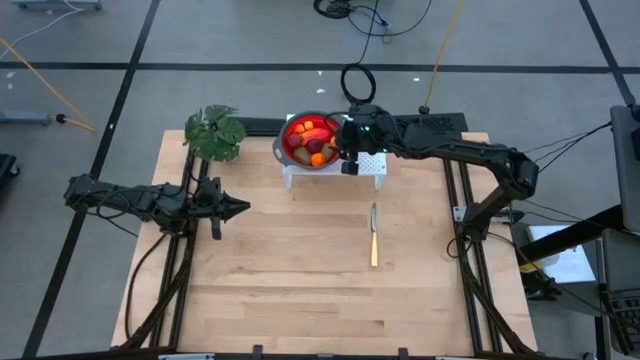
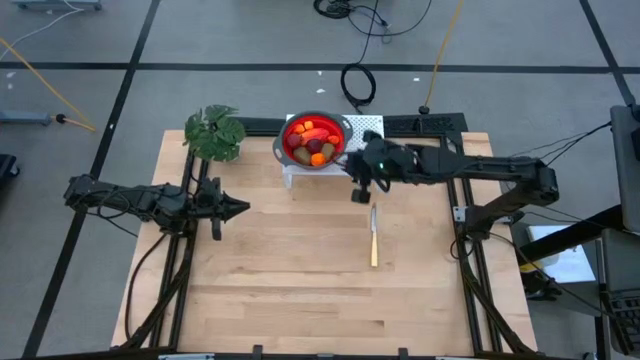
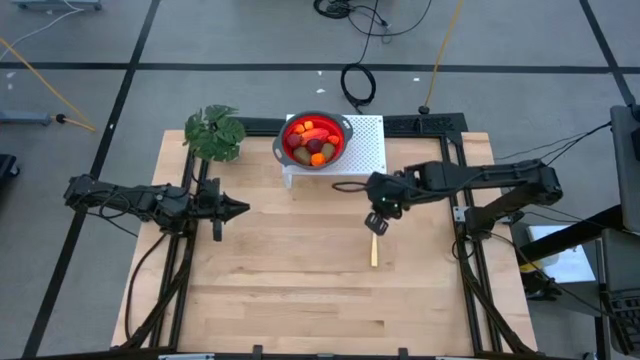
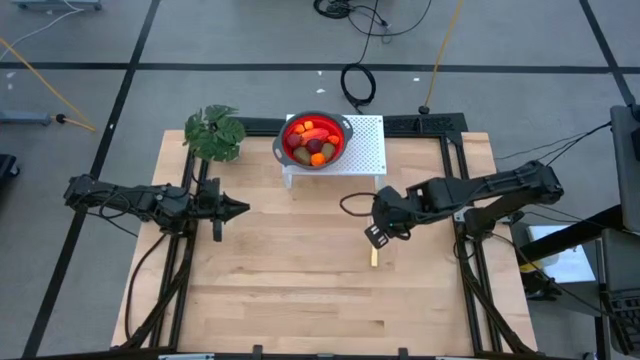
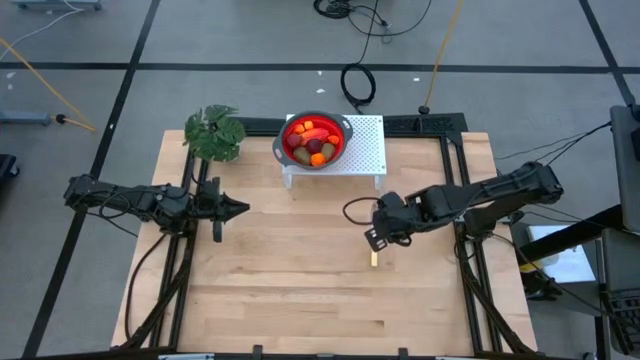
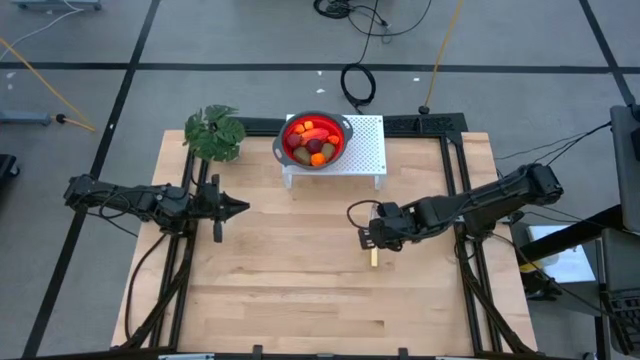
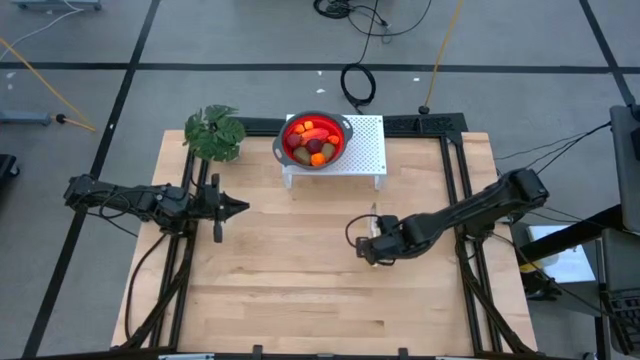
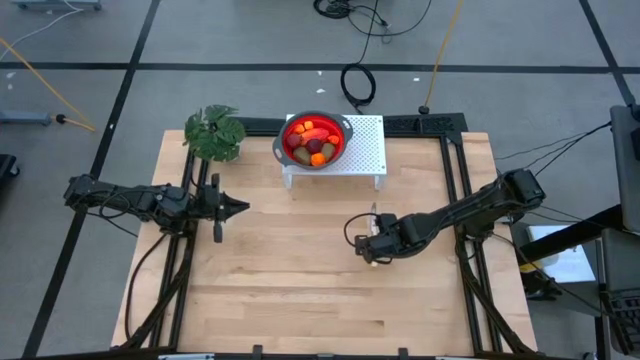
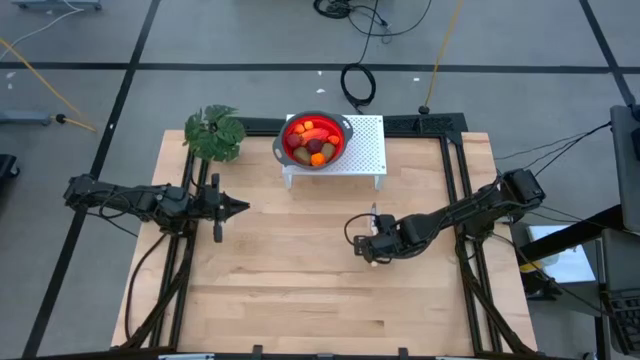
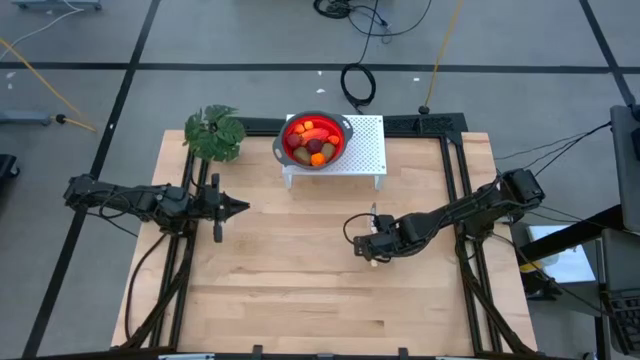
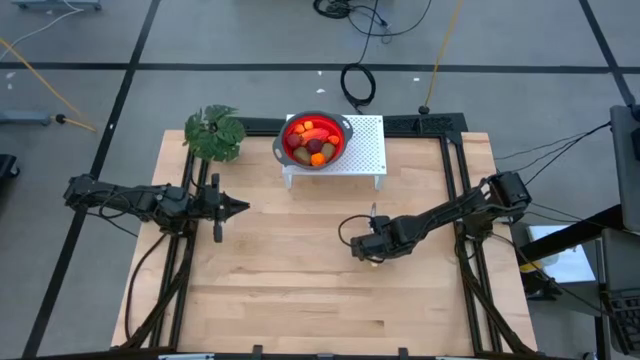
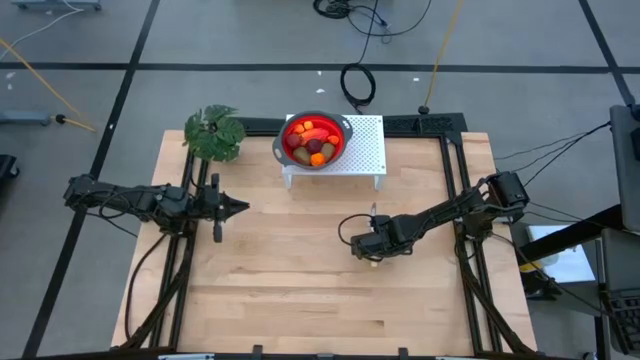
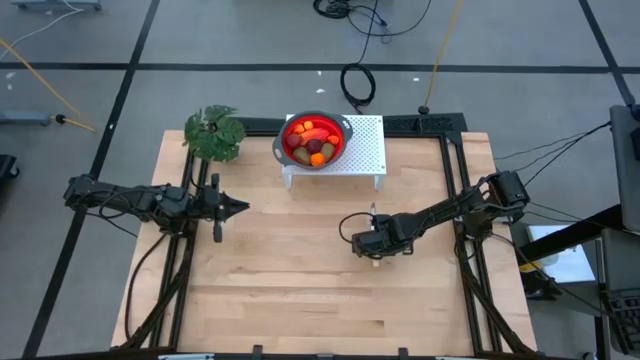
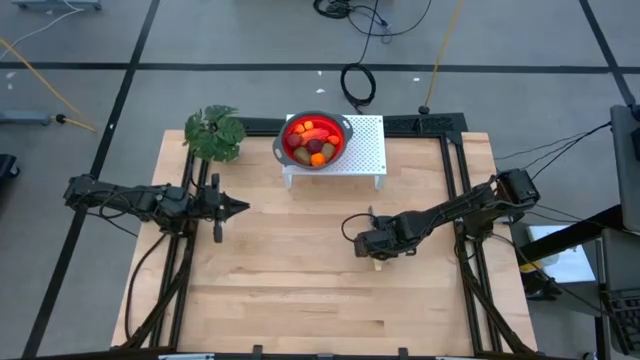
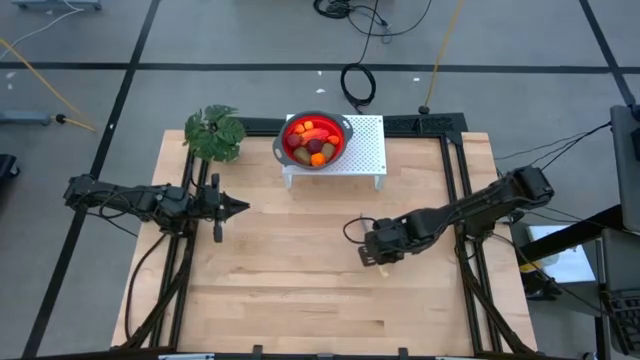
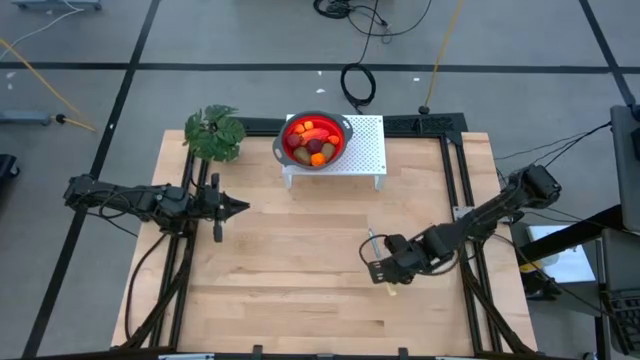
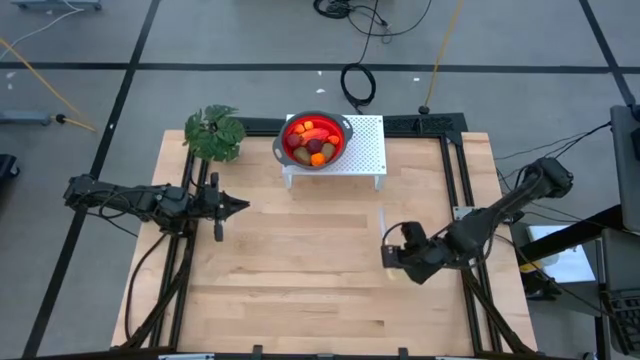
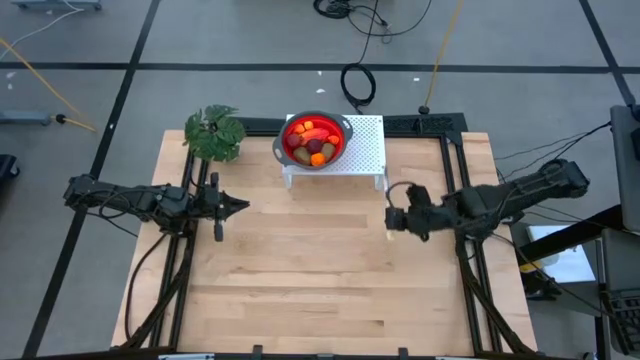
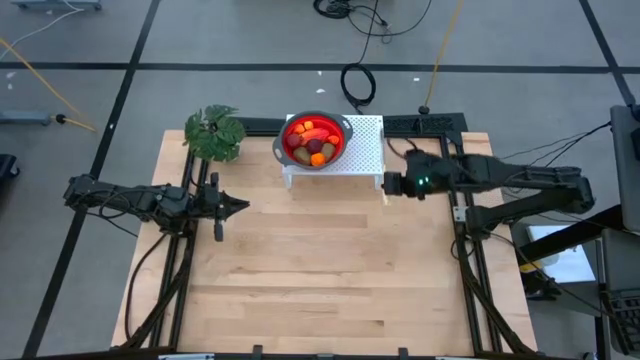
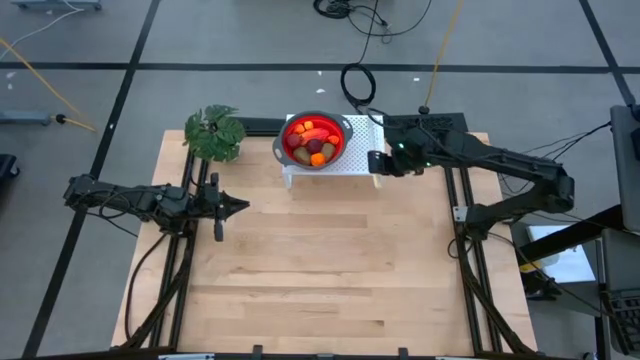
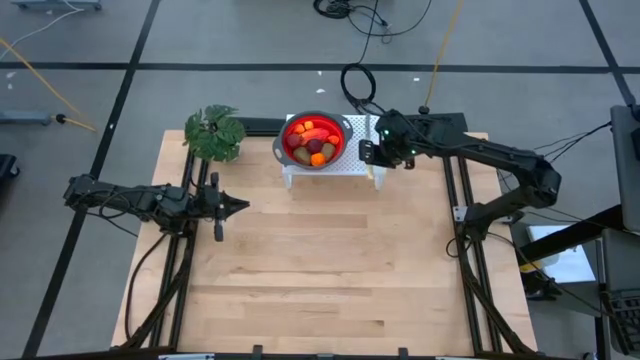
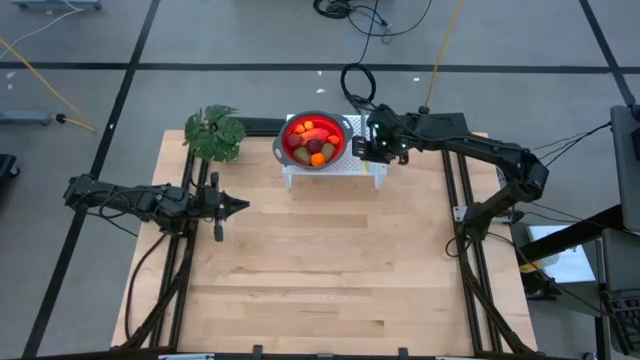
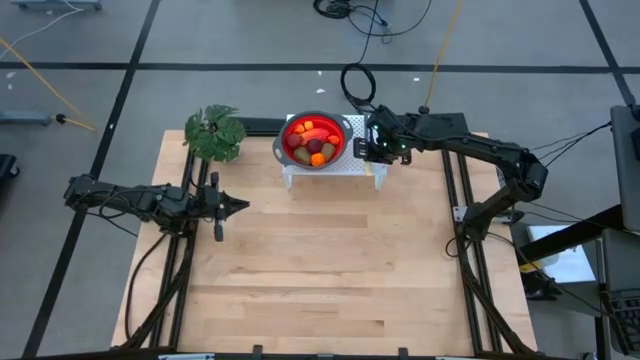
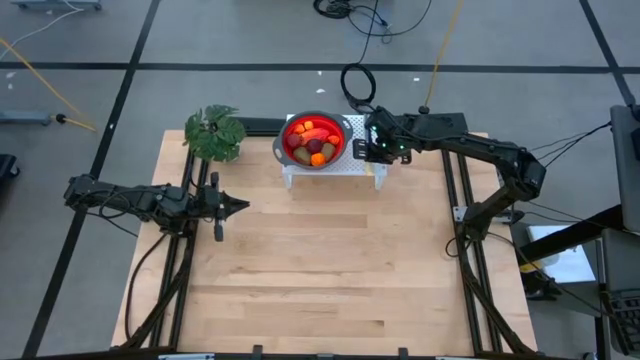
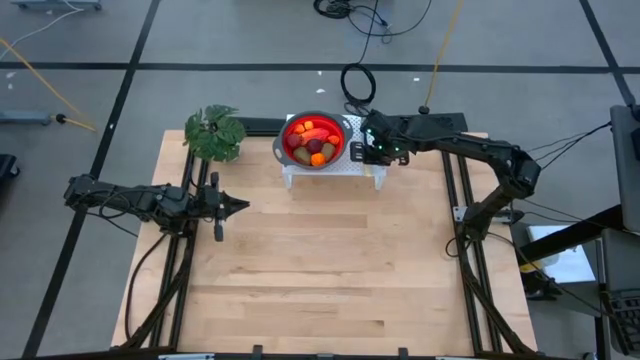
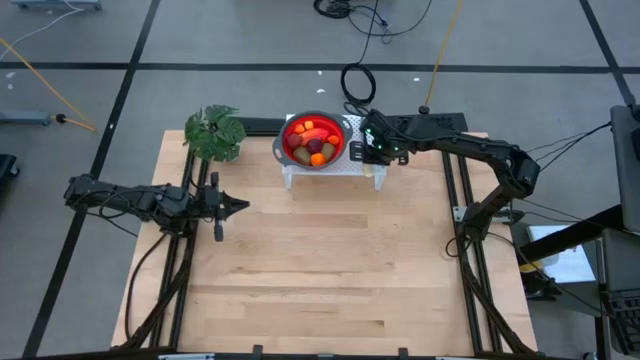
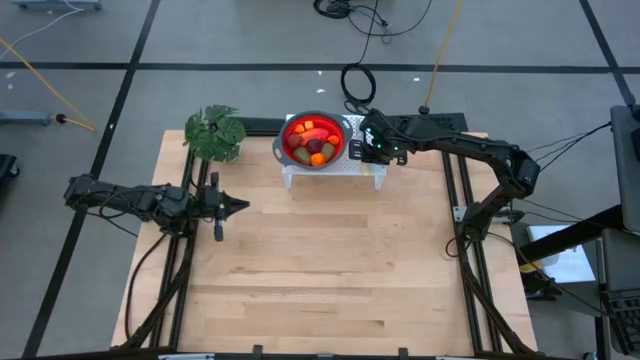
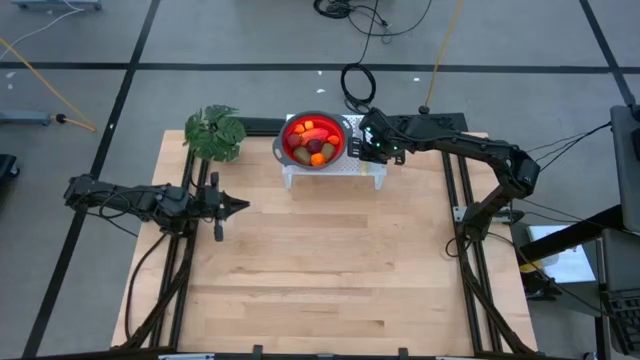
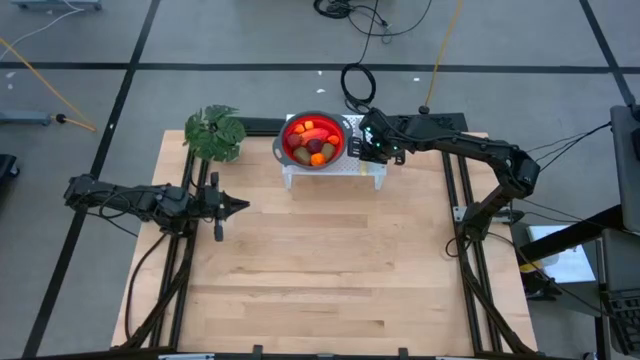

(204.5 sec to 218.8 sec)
Task: Pick & Place Fruit
Put the yellow knife on the shelf
